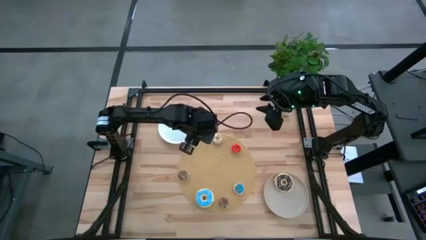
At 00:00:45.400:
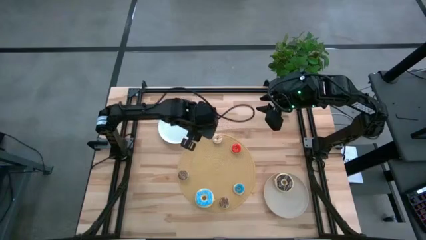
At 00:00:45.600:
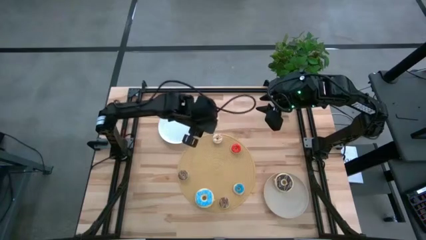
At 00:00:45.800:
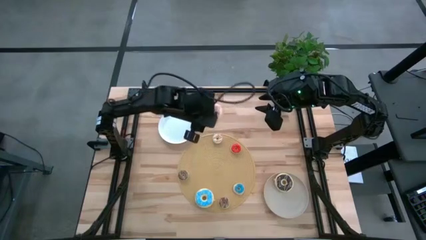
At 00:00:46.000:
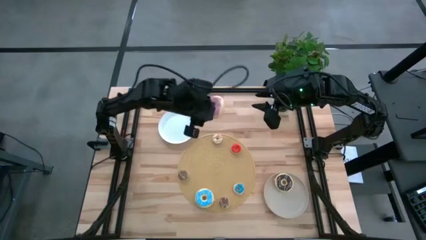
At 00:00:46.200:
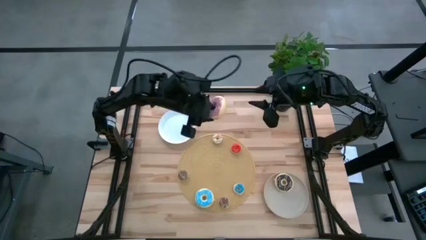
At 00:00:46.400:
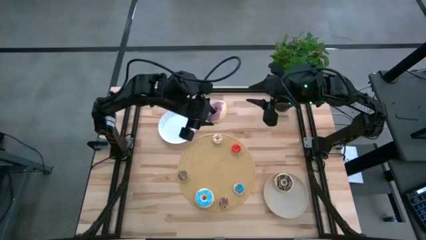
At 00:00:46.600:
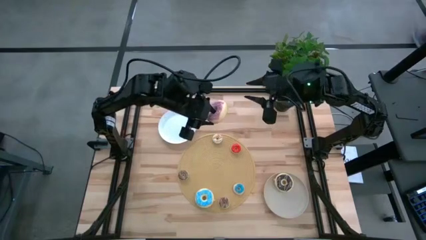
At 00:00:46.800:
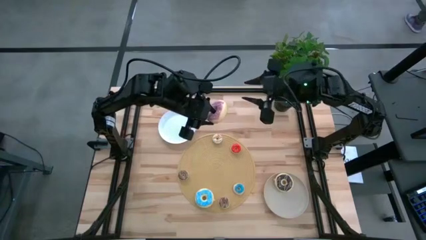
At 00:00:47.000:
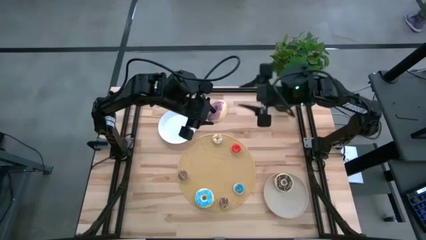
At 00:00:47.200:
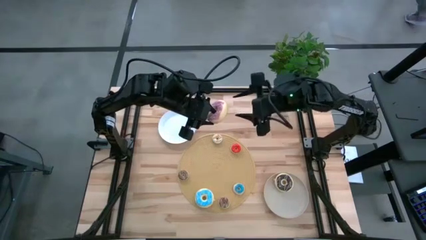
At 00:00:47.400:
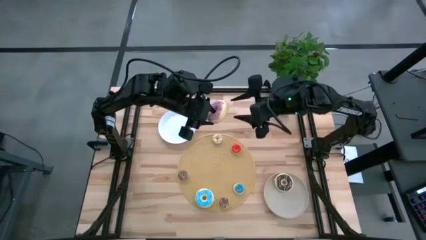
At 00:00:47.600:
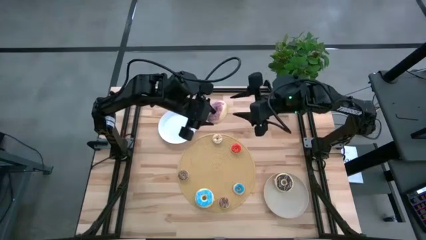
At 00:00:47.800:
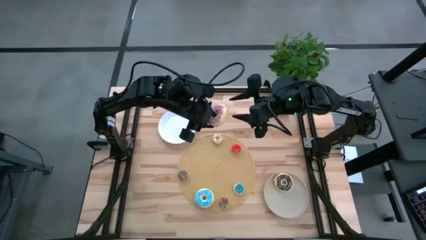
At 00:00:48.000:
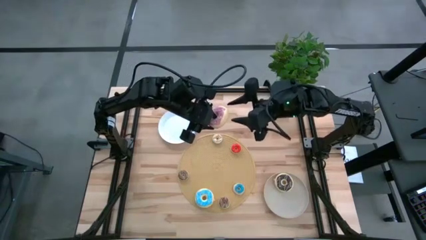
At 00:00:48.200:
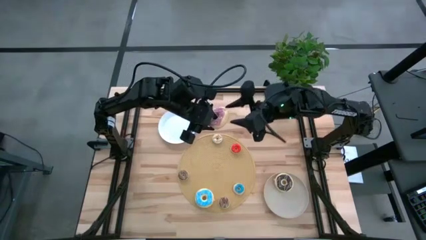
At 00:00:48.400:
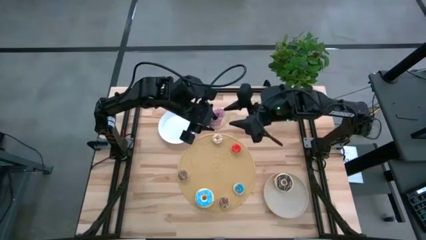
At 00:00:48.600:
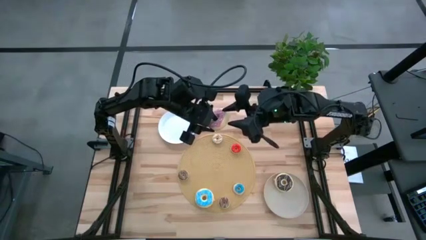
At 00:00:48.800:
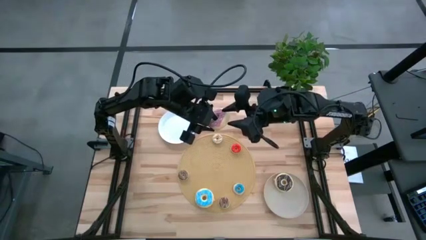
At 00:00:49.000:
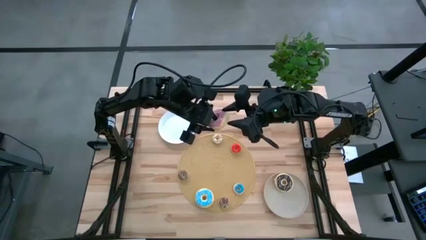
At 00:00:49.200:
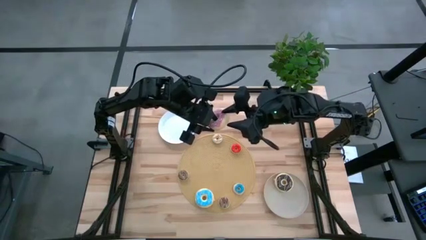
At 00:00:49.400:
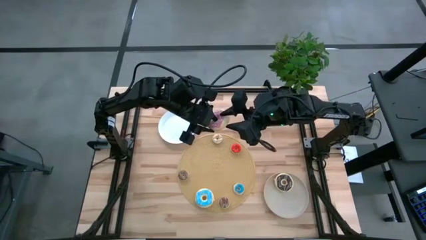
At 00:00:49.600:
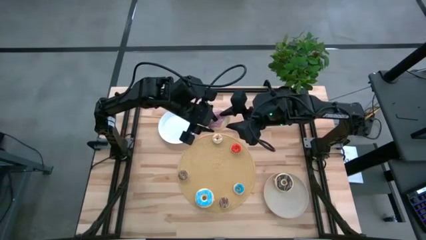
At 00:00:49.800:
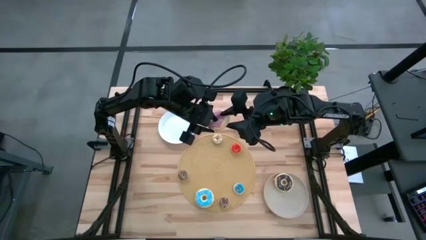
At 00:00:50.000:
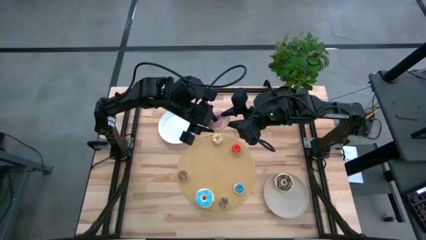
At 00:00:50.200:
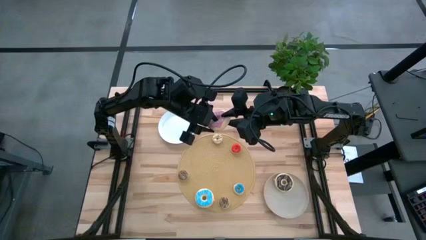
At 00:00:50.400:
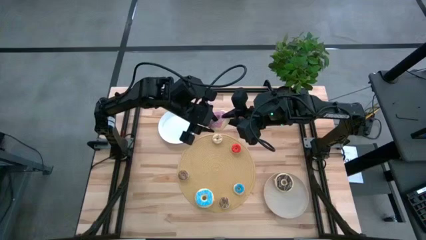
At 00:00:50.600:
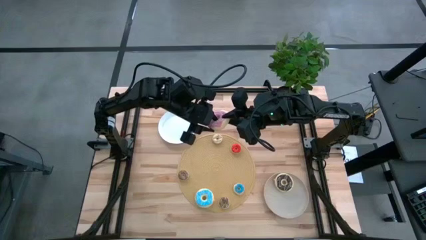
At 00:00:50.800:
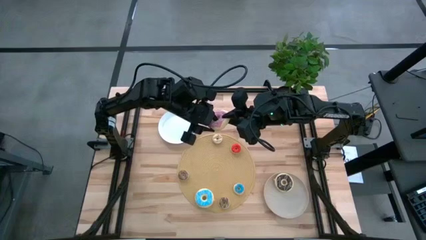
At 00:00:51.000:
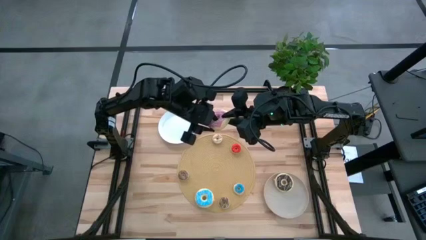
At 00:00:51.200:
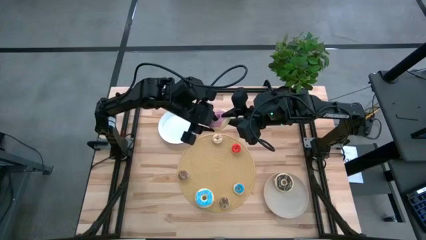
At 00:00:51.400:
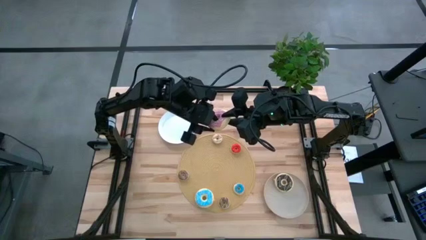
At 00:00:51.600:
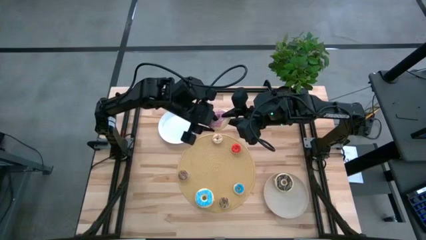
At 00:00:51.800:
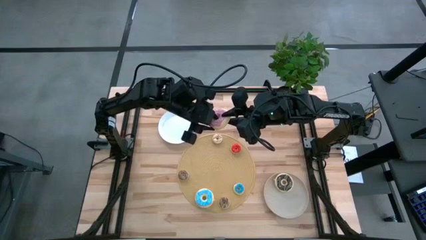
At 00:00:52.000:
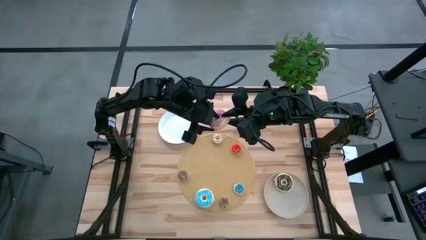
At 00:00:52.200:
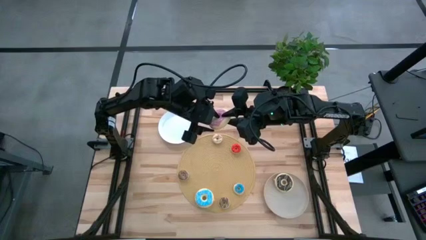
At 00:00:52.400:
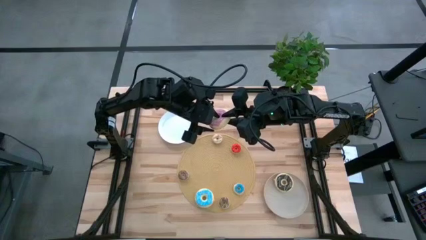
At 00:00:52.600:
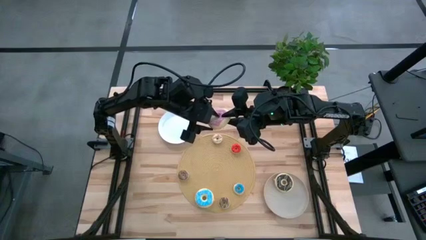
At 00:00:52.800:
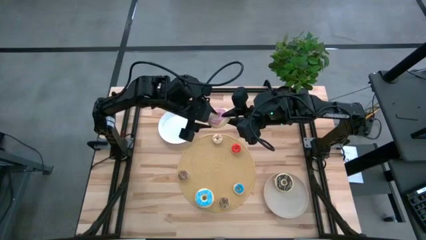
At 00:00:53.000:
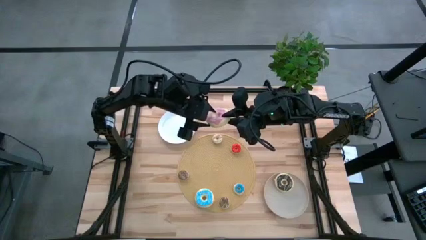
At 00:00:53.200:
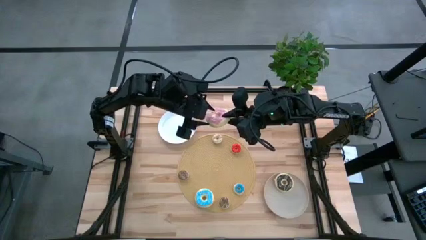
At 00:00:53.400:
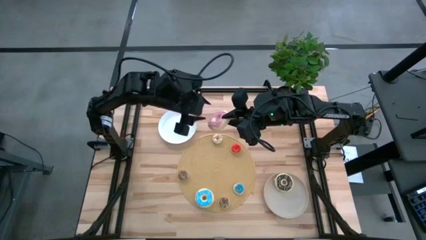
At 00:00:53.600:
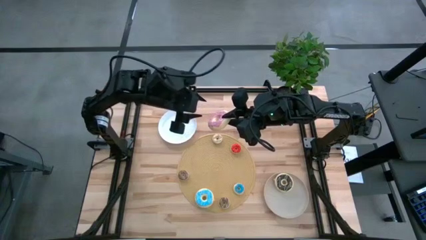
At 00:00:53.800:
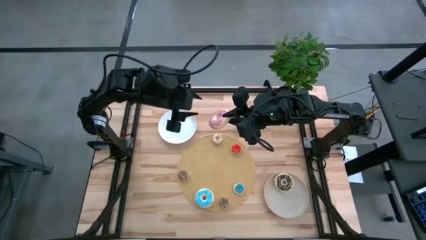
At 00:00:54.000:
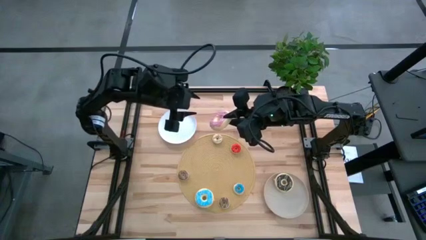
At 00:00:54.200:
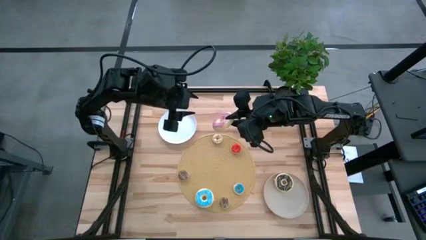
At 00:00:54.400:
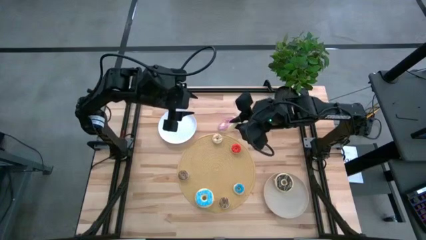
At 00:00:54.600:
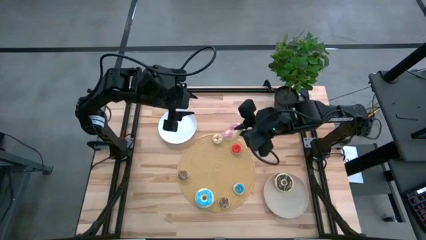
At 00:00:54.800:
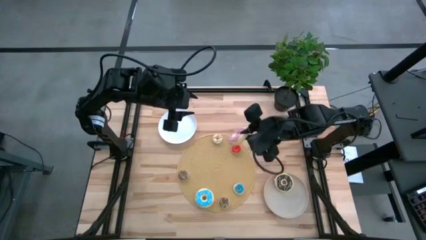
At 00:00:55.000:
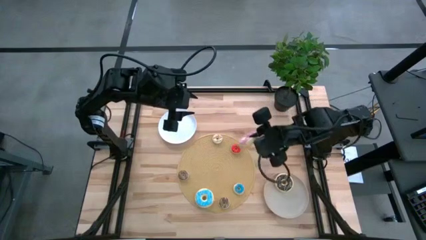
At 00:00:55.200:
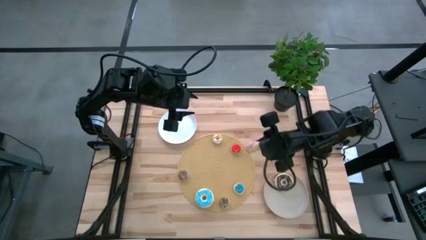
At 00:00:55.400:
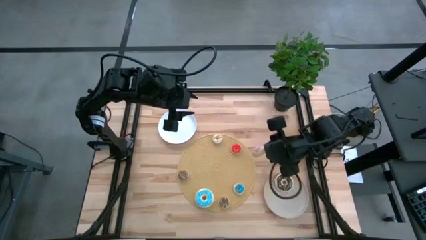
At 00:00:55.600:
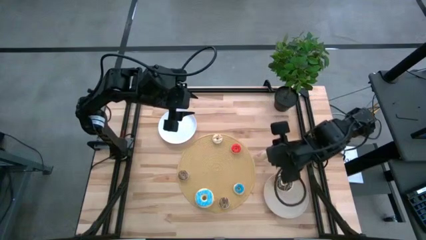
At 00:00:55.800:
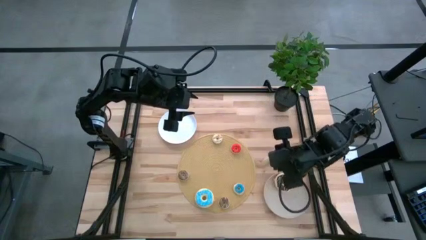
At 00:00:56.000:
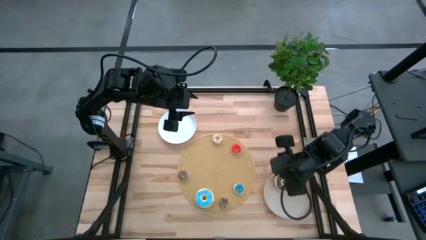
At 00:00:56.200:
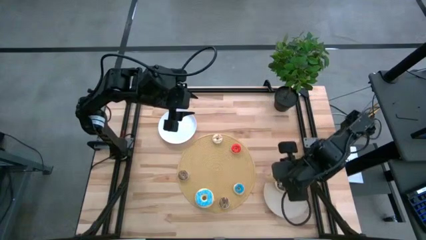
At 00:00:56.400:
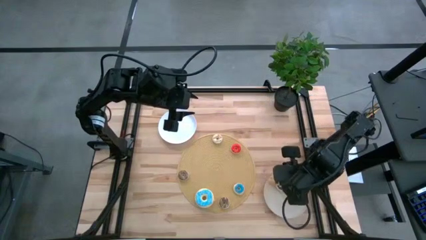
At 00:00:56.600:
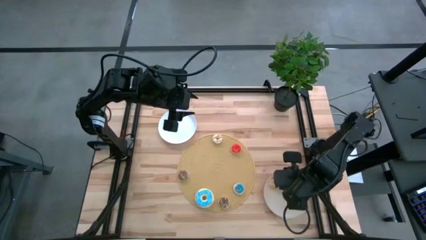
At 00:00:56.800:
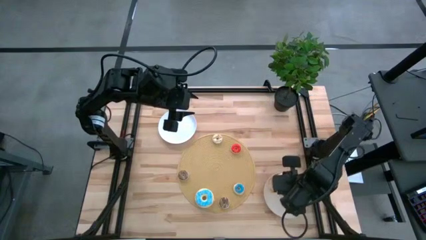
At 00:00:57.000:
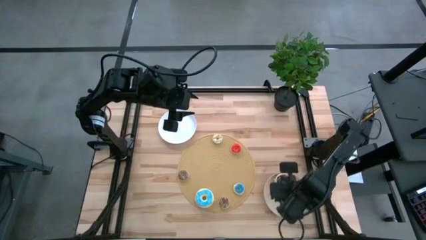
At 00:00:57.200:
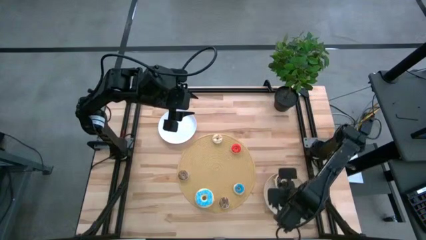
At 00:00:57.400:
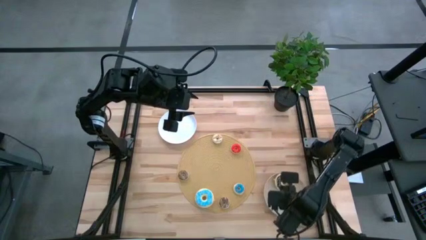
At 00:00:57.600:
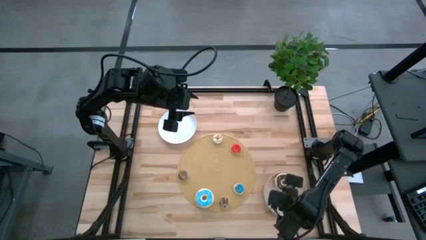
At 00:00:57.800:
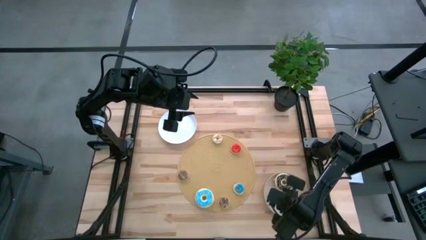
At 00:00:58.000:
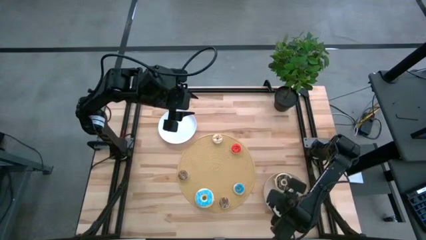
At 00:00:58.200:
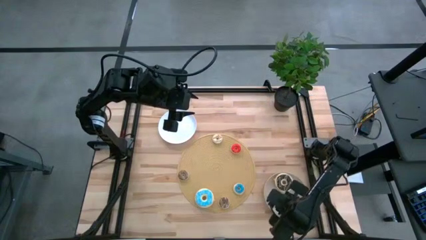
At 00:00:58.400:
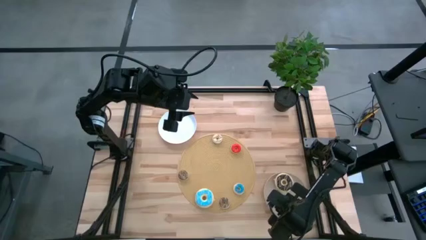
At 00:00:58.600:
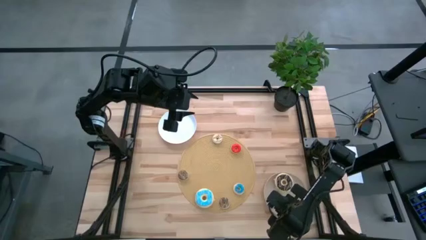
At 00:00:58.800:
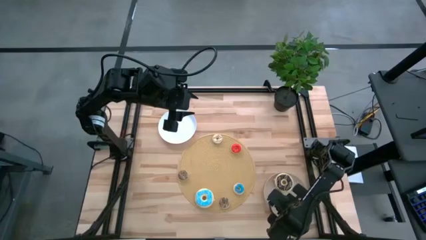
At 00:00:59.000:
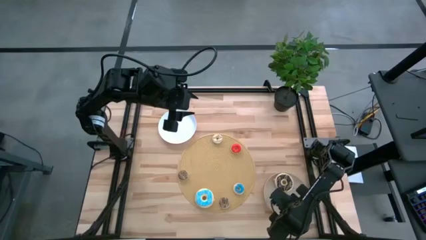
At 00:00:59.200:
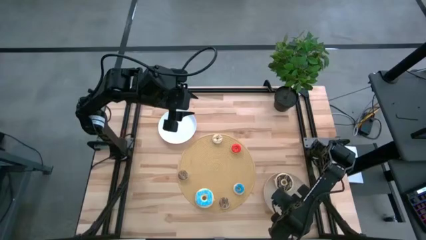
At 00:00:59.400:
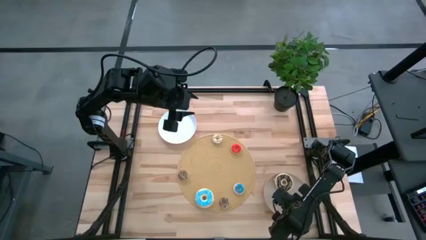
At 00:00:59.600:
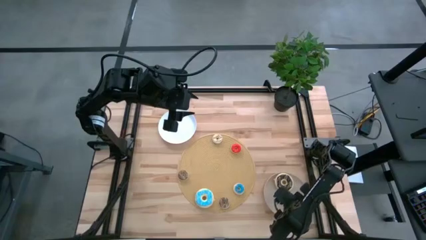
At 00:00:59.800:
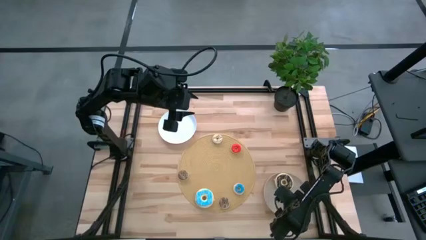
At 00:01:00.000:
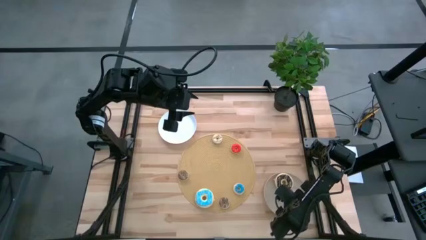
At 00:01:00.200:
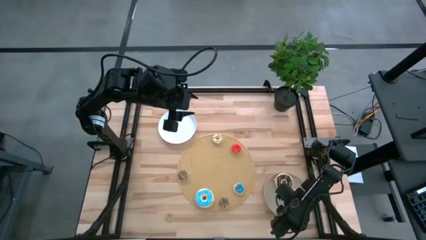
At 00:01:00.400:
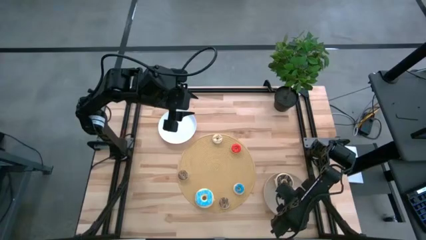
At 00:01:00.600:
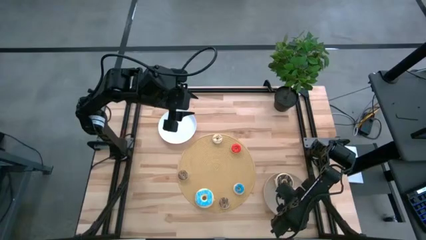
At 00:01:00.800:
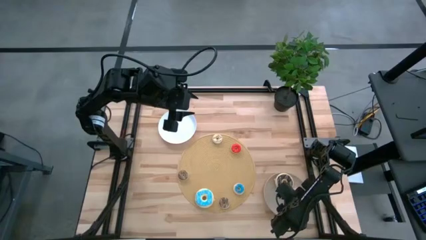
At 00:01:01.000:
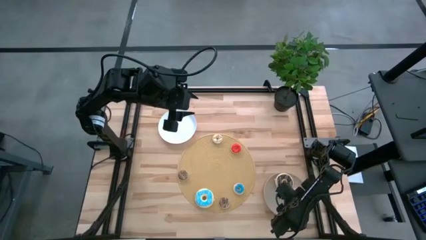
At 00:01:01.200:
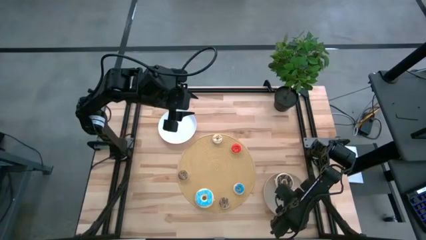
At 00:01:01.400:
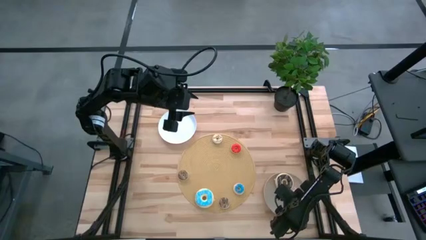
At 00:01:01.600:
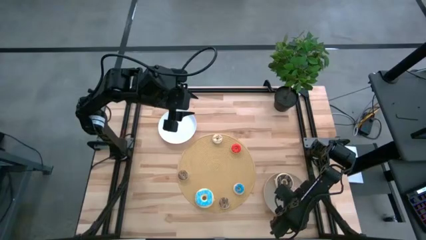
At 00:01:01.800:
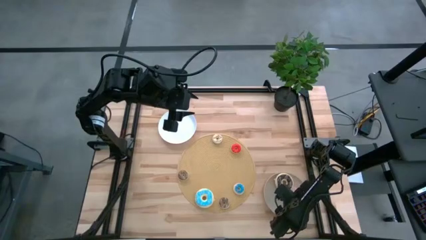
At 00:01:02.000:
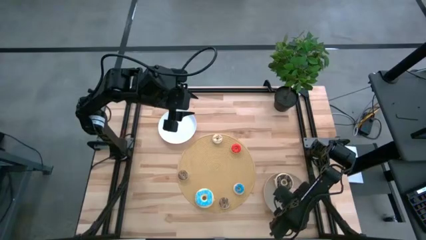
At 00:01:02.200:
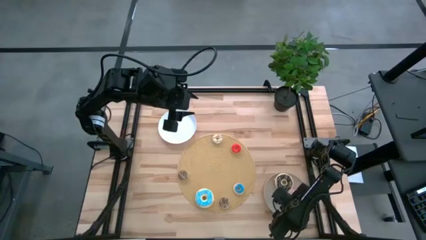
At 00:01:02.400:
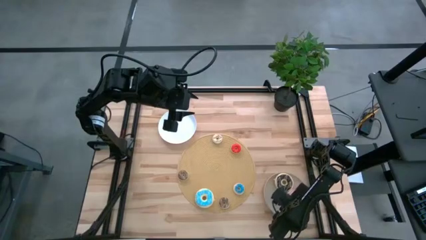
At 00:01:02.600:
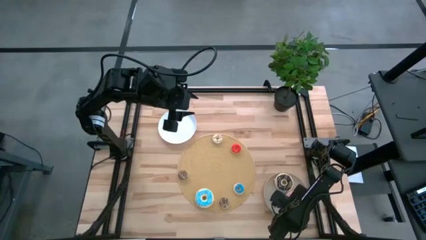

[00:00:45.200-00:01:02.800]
Task: Pick & Place donuts
Put the large pink donut into the gray plate
